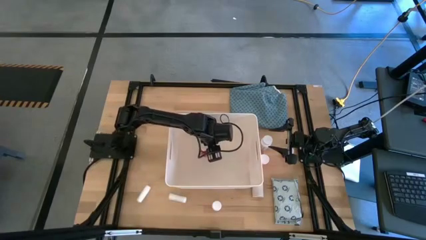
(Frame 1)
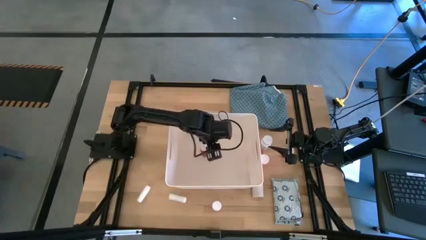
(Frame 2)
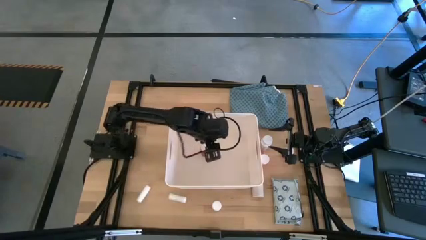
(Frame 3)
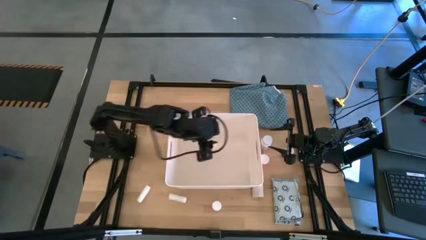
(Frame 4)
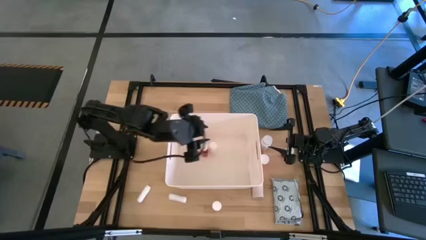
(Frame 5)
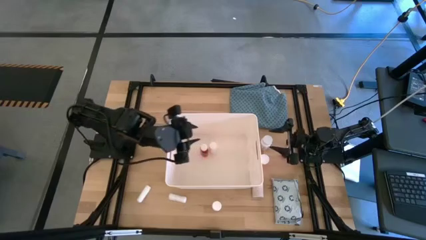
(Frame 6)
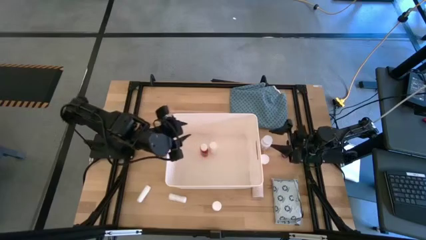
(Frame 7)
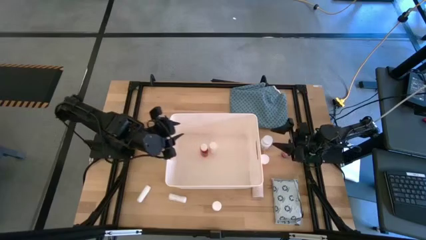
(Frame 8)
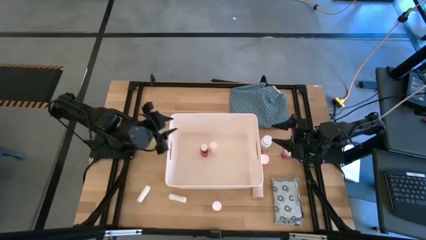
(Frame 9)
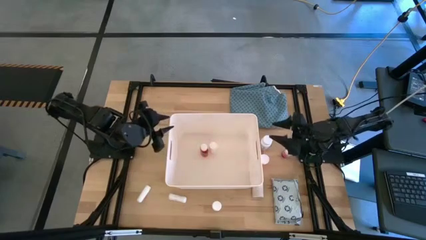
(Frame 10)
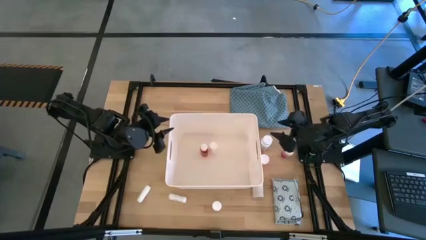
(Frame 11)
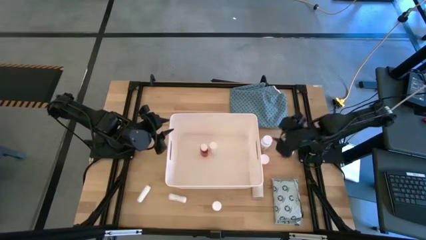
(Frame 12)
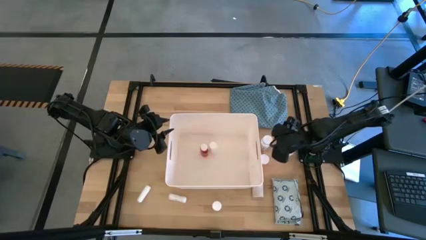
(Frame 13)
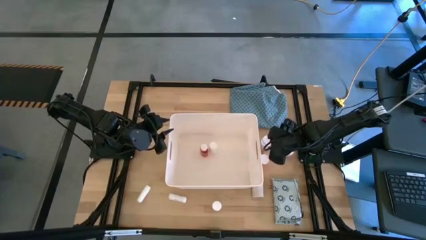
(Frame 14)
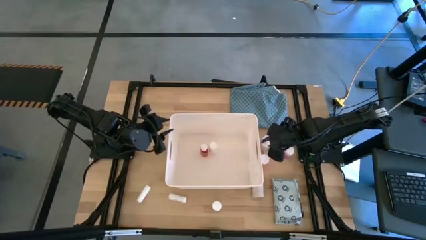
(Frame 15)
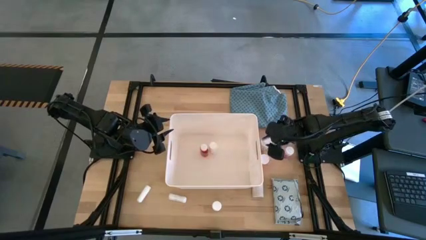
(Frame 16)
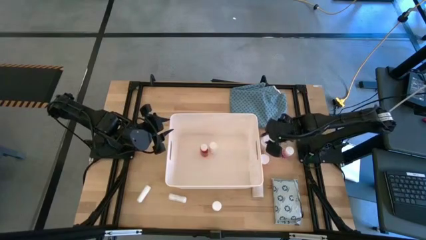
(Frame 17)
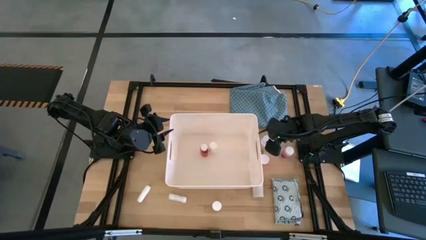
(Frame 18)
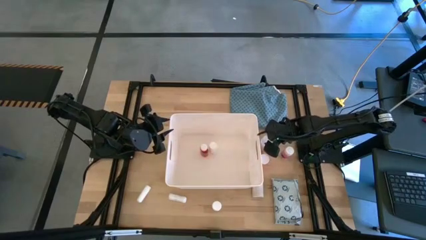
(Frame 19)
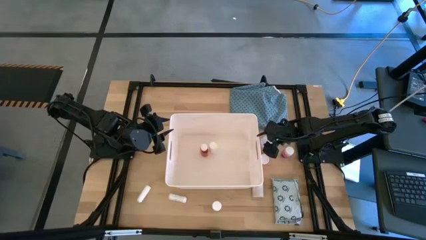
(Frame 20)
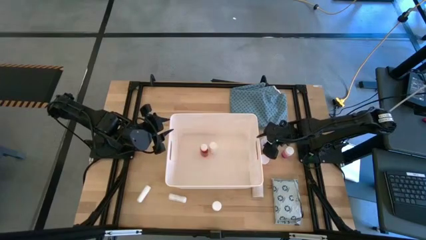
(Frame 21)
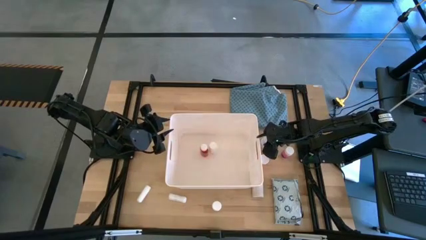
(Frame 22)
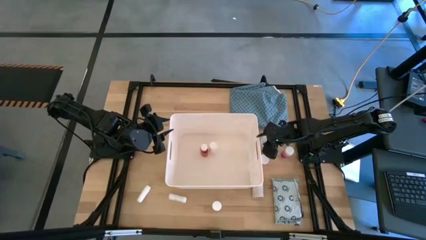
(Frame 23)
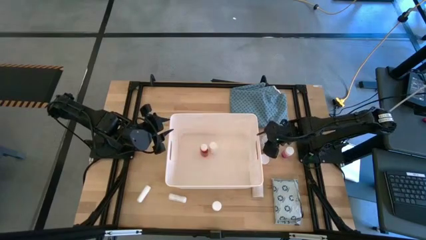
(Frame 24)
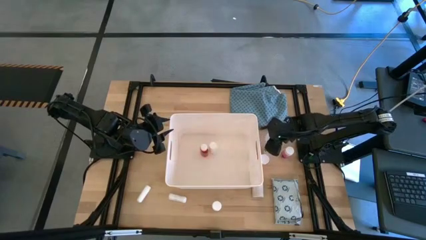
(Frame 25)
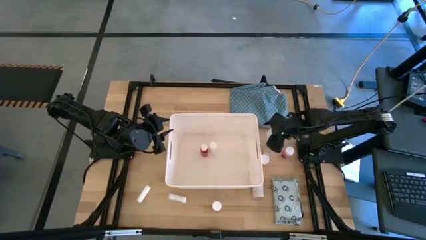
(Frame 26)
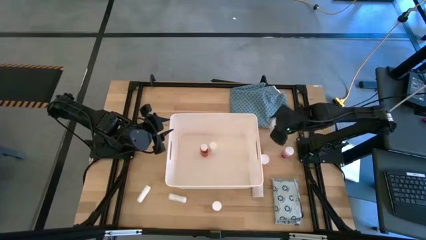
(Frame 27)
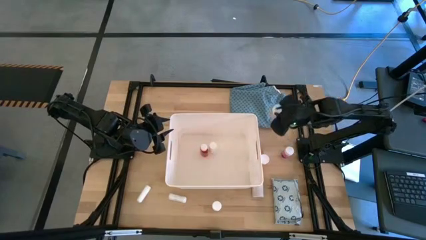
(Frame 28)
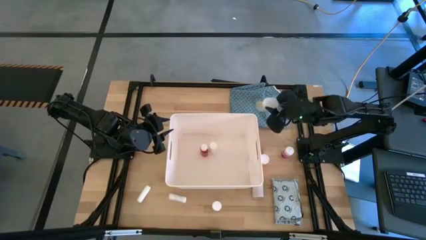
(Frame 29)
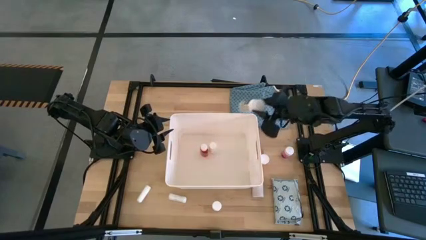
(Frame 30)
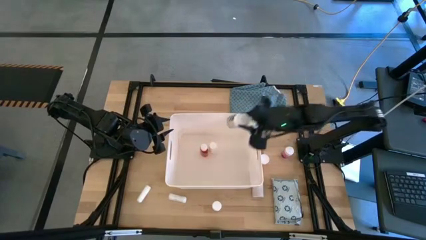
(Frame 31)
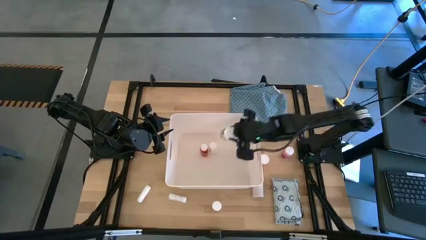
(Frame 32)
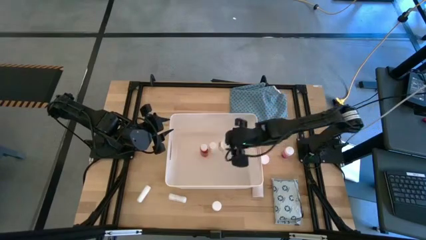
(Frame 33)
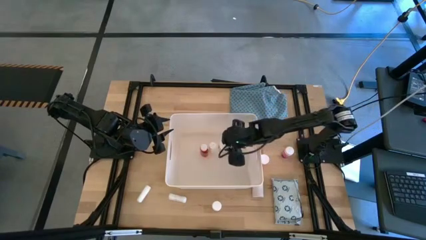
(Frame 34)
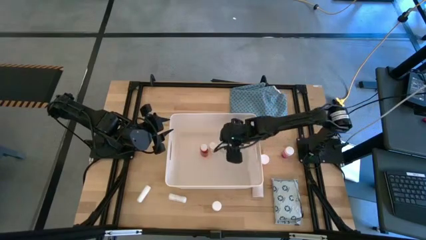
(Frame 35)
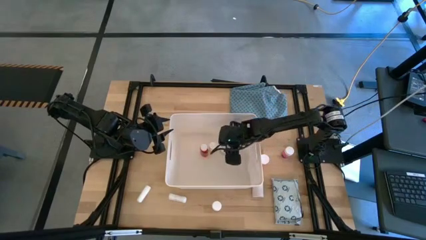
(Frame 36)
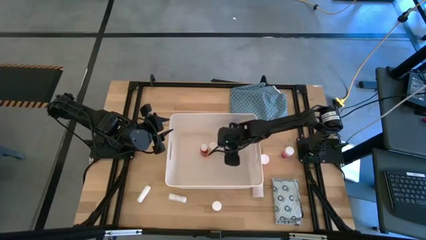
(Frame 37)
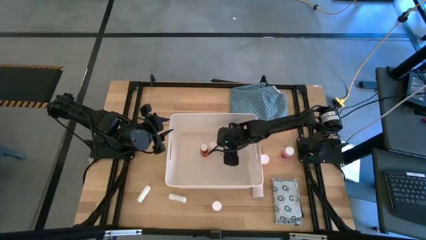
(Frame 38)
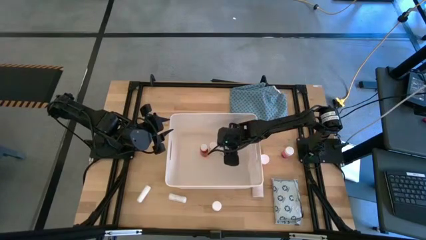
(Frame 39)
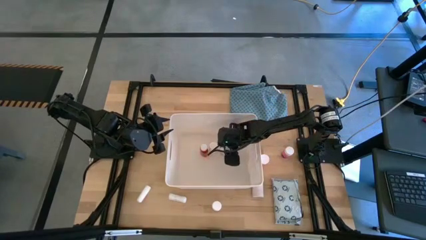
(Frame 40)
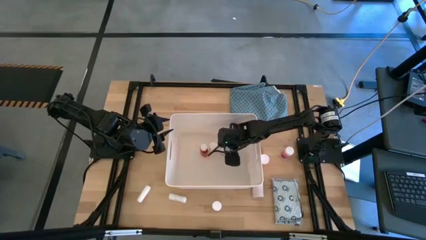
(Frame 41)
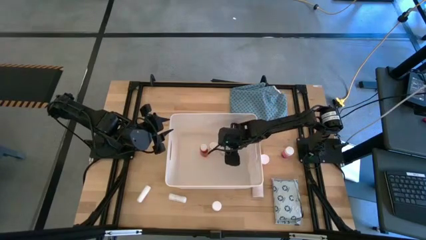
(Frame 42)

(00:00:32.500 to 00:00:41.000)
Task: Pick & place medical supplies in basket/bin
Put the top white medicine bottle into the white bin

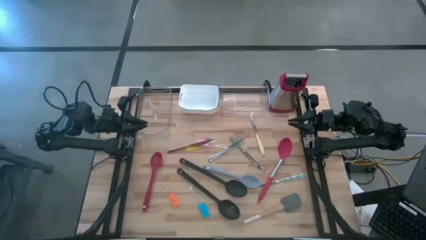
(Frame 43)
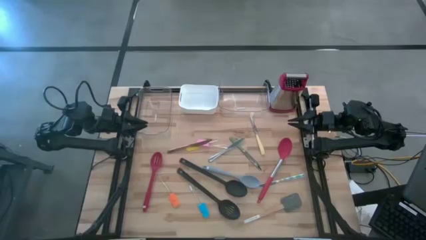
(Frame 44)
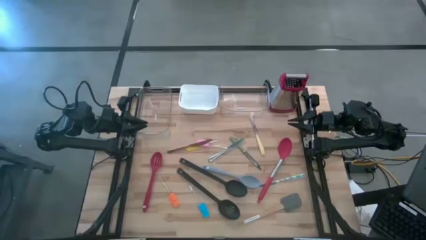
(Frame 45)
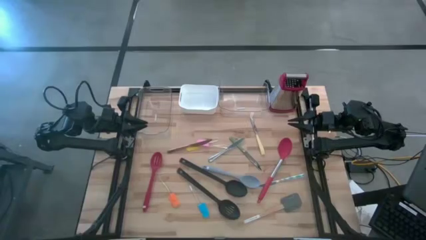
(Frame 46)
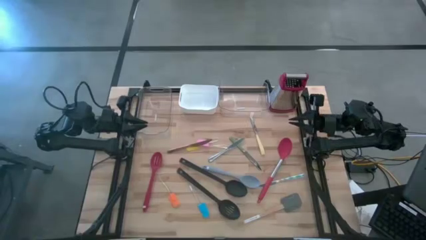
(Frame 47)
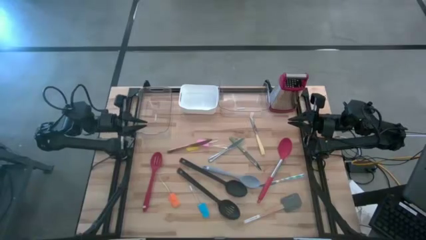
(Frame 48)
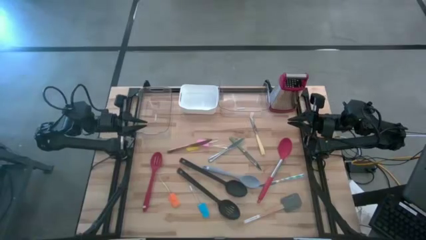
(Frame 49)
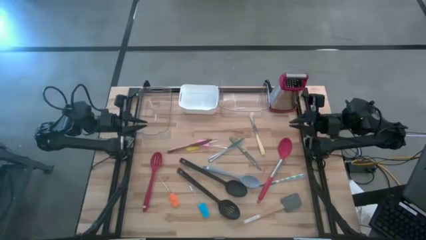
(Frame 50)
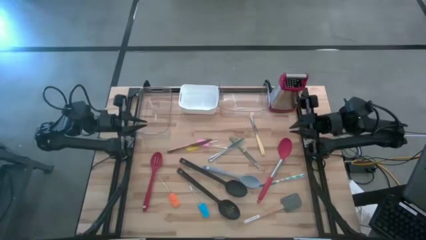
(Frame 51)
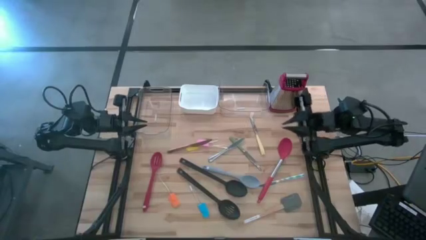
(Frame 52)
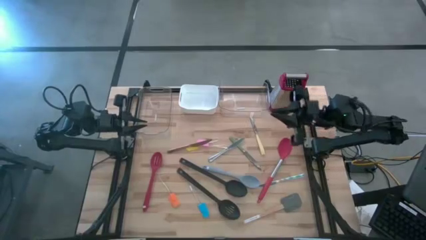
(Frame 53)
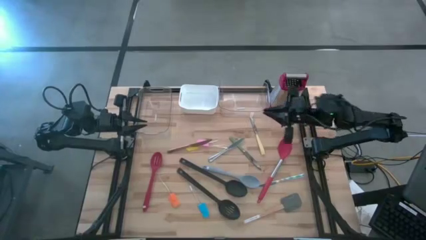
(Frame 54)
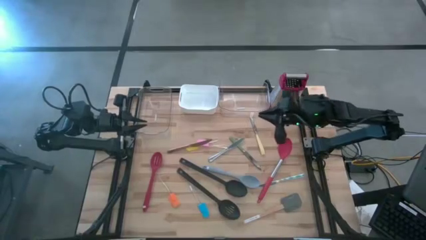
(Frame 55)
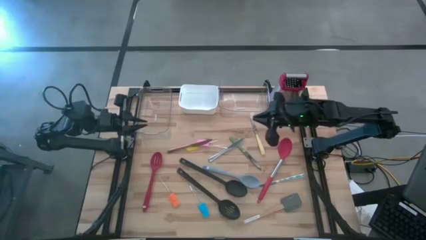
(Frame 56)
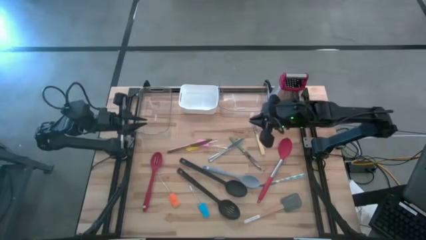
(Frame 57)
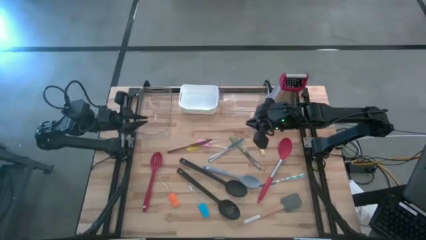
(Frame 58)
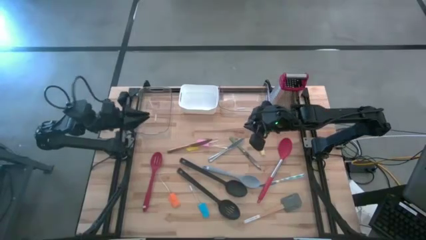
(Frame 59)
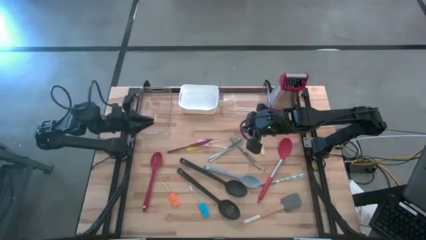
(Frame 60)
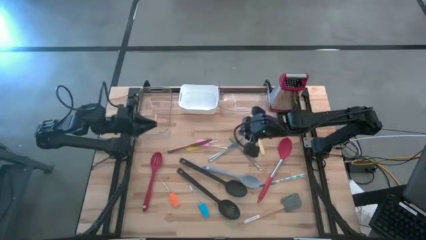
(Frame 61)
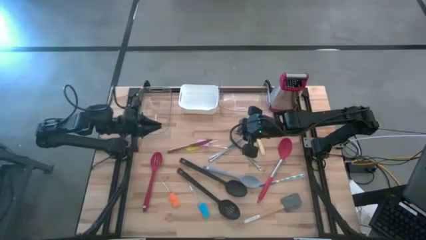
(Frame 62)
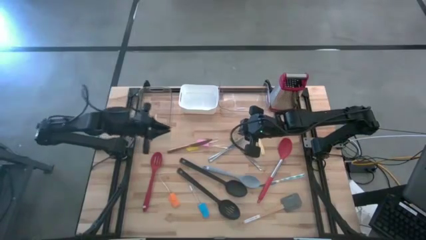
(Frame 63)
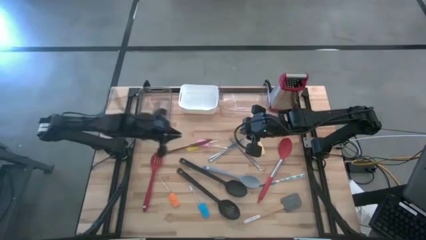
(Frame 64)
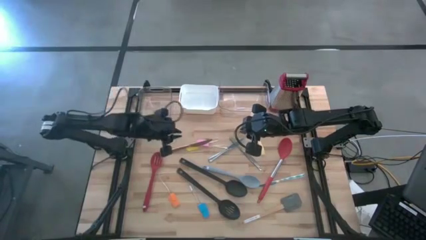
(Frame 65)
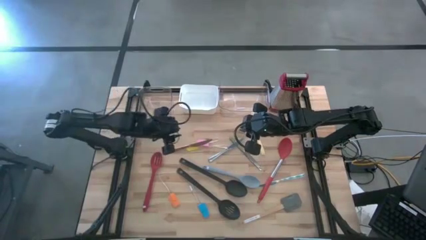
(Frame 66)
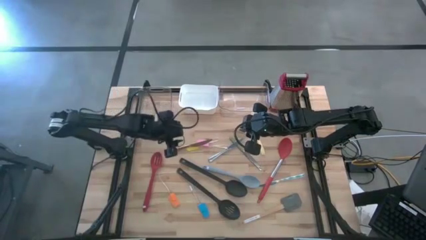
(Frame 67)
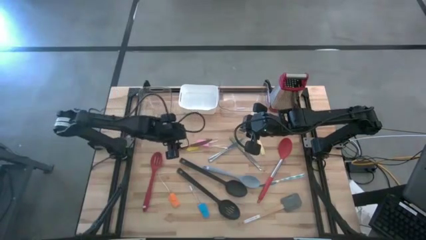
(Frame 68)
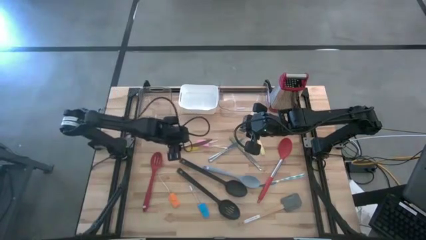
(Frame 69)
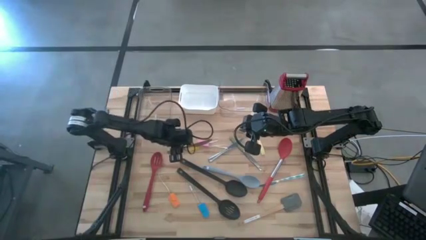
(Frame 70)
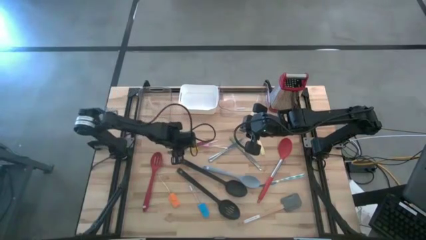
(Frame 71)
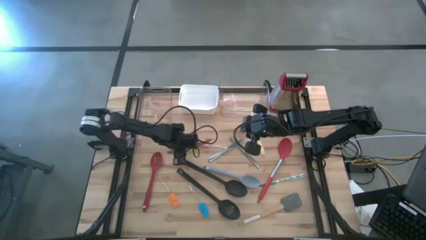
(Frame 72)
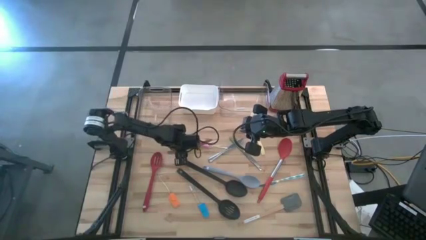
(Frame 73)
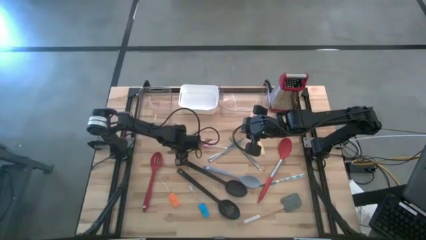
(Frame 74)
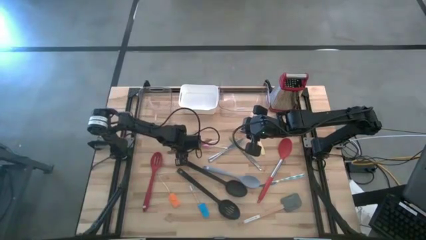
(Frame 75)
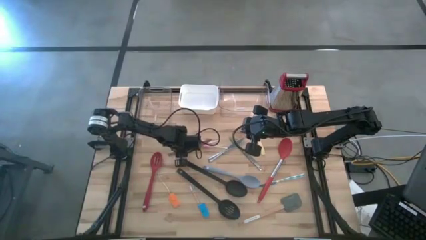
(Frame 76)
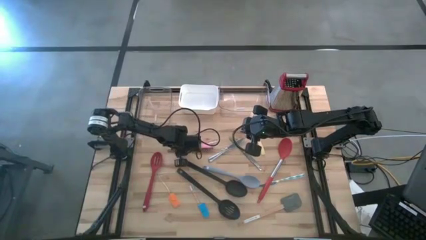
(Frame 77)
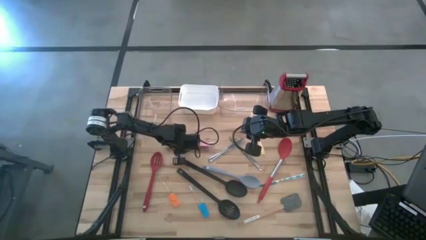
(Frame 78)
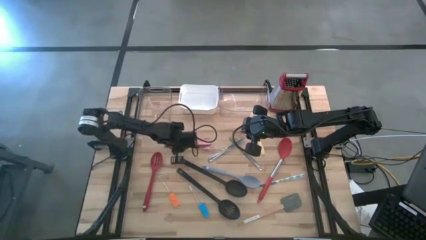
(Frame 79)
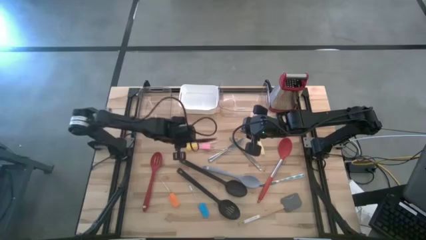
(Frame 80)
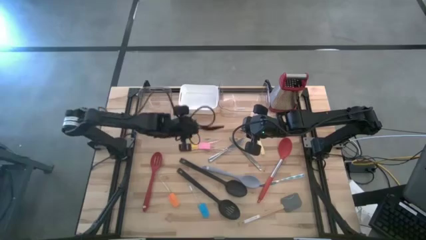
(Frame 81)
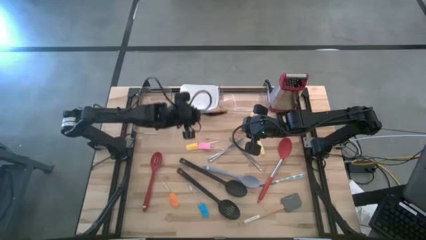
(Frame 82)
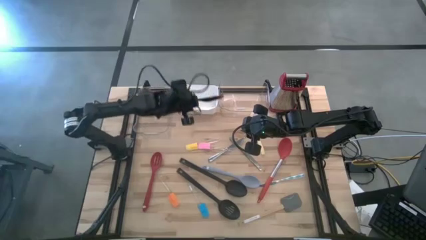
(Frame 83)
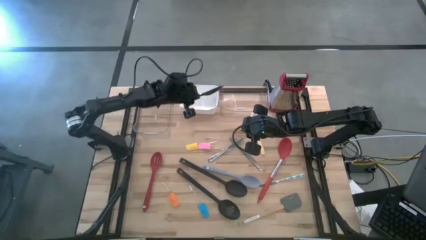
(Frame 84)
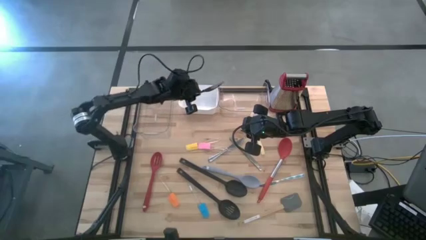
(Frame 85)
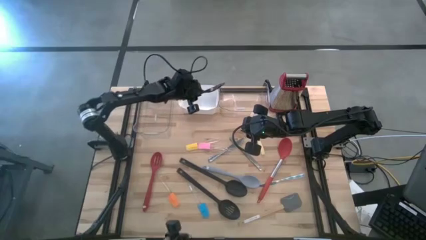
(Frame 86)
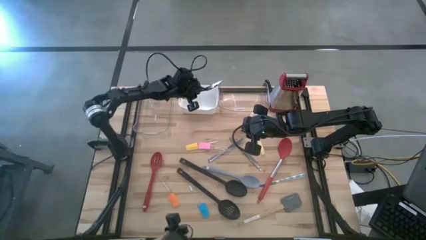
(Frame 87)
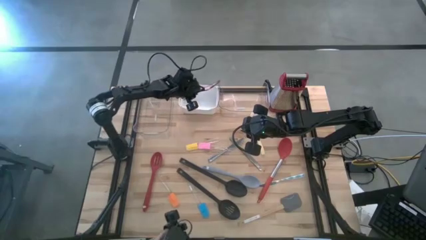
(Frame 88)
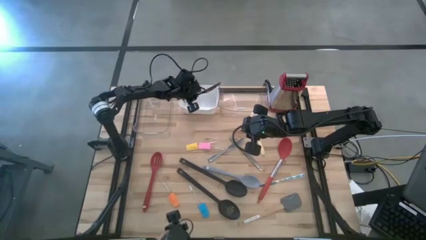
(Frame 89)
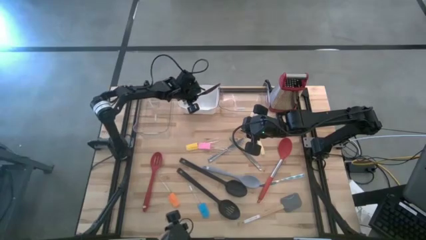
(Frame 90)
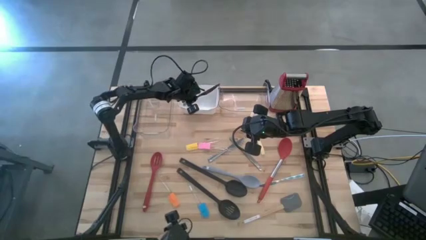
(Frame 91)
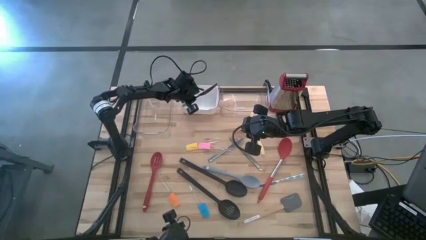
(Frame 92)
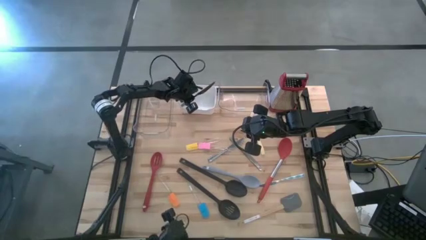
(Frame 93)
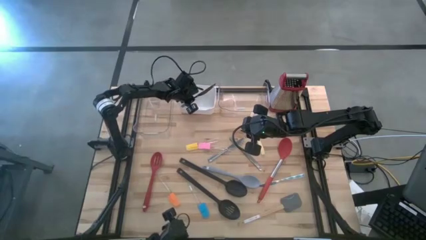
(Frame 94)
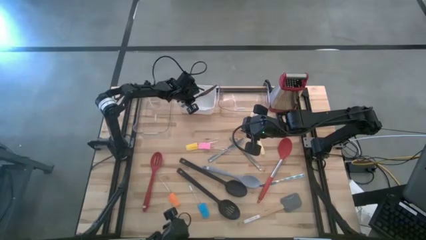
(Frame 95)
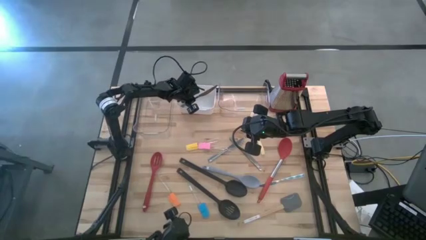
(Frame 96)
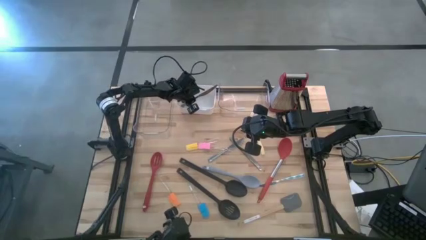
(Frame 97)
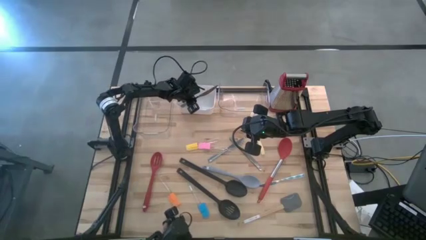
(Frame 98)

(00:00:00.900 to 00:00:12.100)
Task: Pick & Place Kitchen Items
Put the gold knife into the white bin
